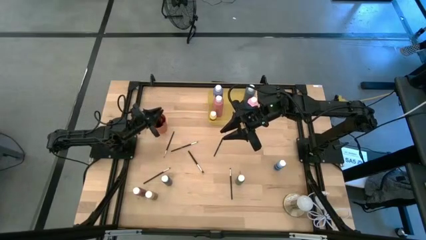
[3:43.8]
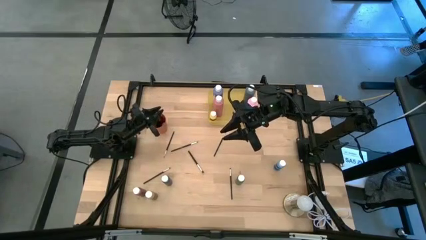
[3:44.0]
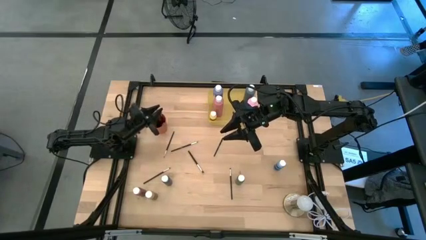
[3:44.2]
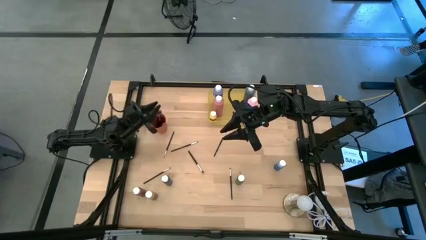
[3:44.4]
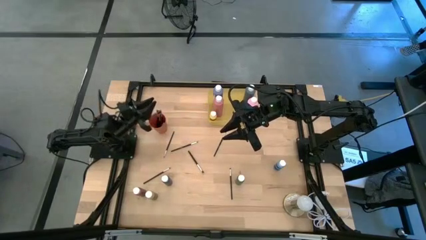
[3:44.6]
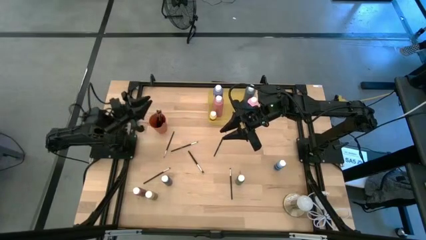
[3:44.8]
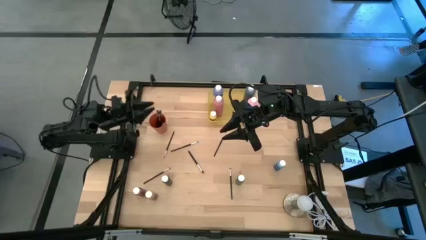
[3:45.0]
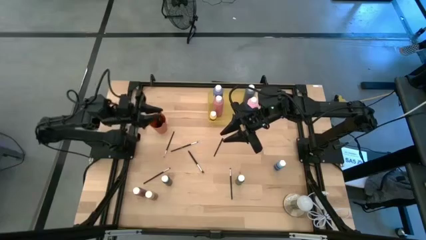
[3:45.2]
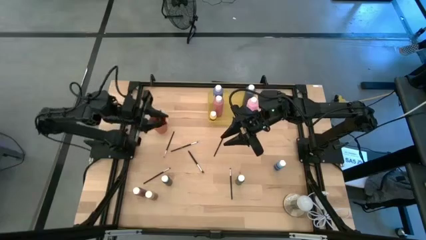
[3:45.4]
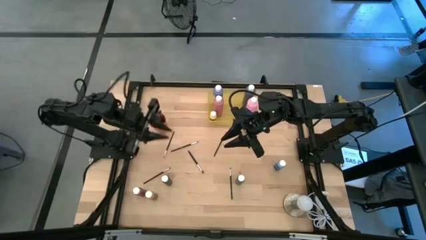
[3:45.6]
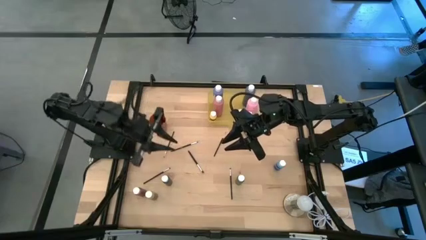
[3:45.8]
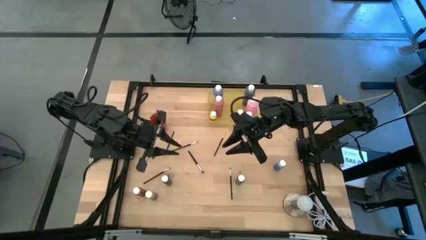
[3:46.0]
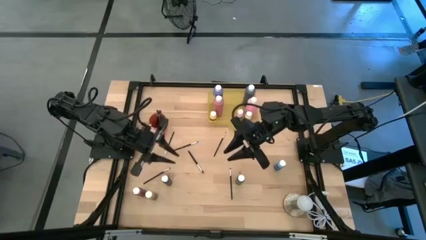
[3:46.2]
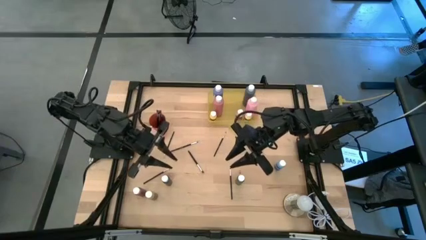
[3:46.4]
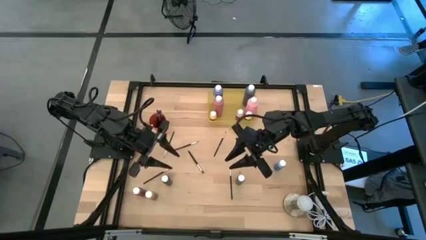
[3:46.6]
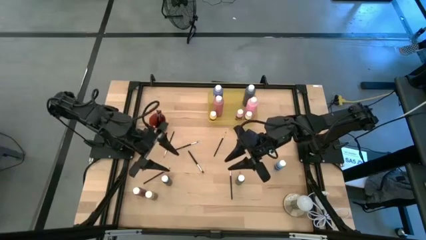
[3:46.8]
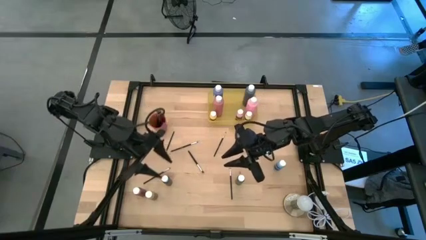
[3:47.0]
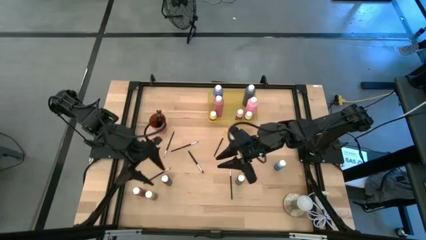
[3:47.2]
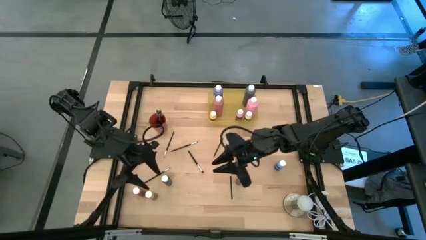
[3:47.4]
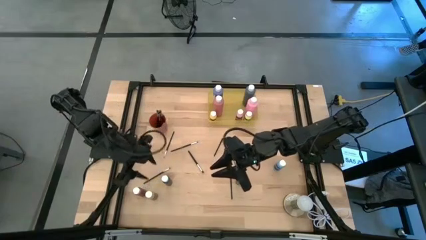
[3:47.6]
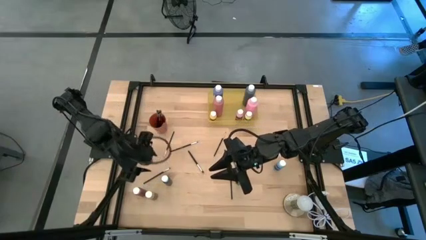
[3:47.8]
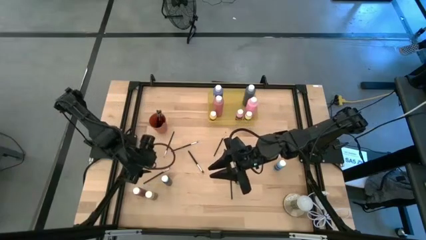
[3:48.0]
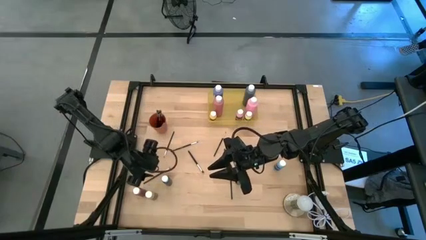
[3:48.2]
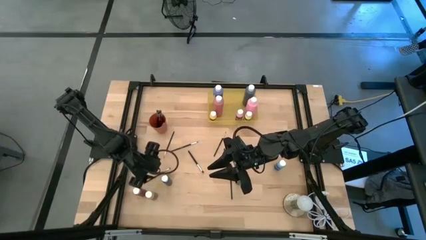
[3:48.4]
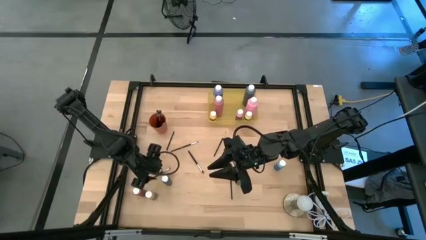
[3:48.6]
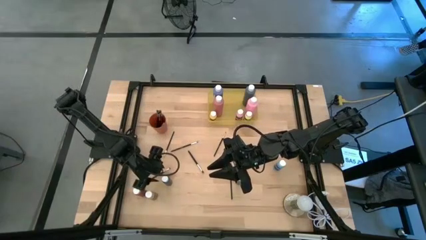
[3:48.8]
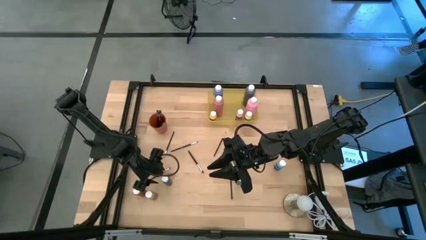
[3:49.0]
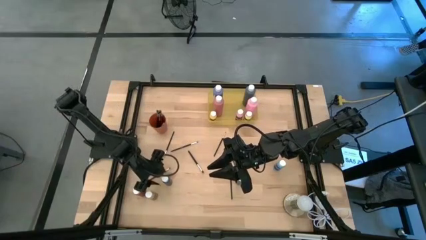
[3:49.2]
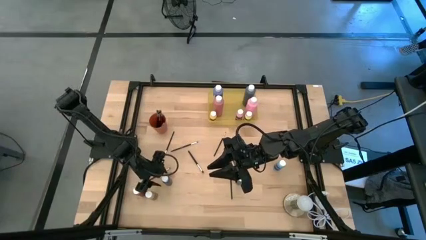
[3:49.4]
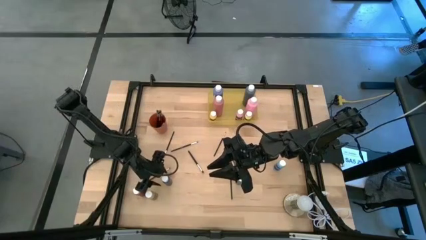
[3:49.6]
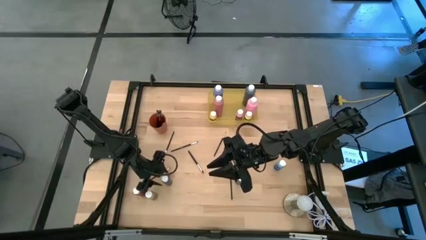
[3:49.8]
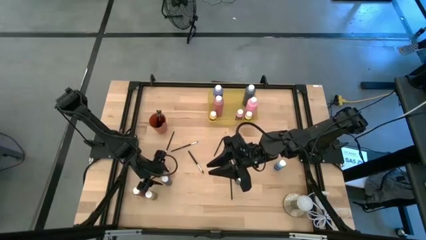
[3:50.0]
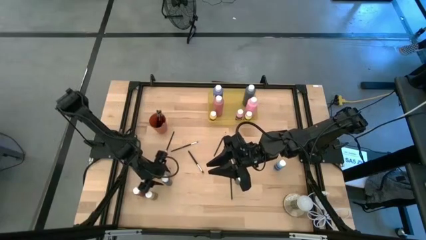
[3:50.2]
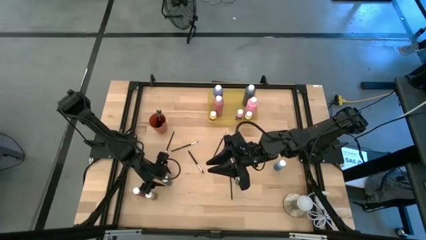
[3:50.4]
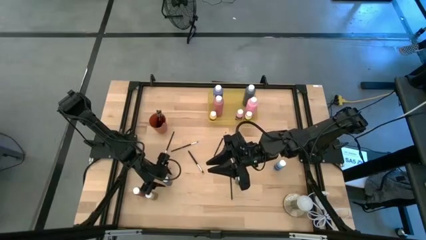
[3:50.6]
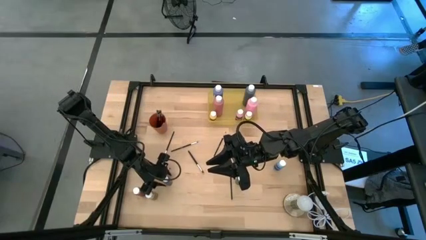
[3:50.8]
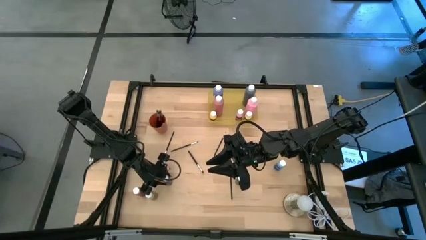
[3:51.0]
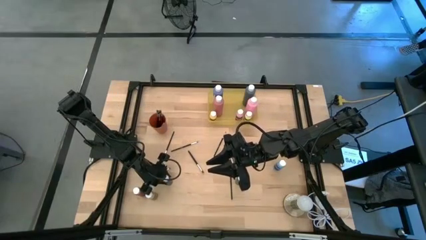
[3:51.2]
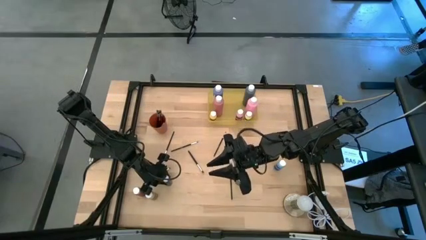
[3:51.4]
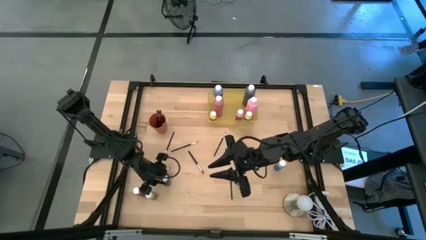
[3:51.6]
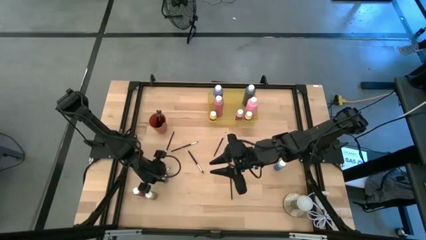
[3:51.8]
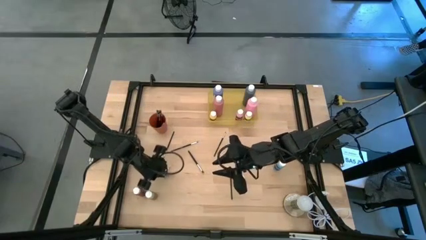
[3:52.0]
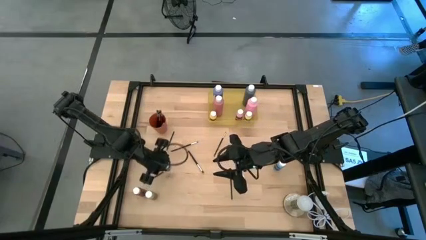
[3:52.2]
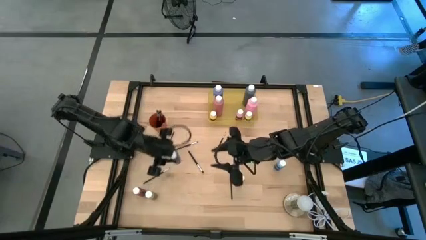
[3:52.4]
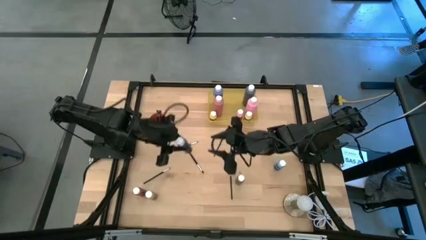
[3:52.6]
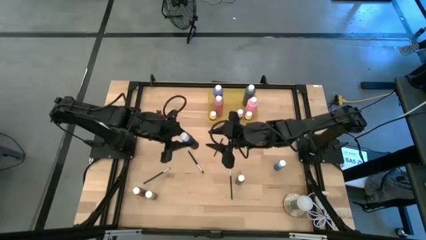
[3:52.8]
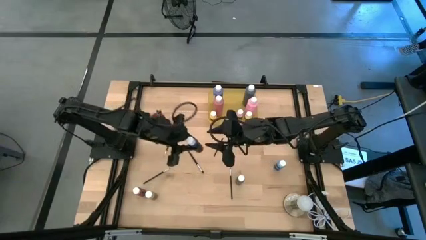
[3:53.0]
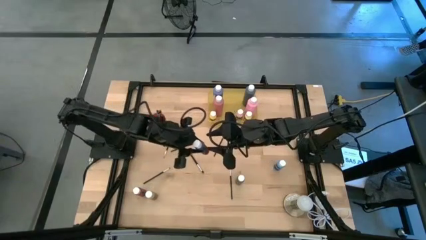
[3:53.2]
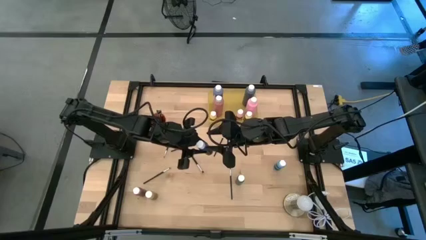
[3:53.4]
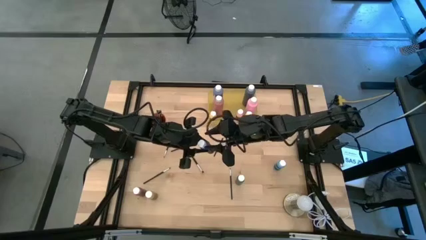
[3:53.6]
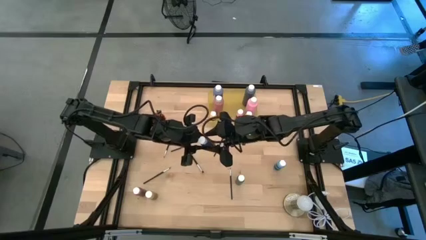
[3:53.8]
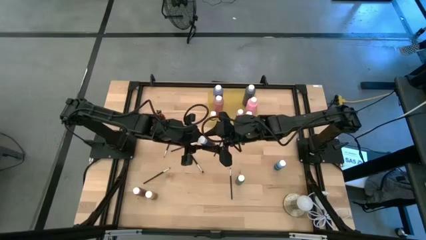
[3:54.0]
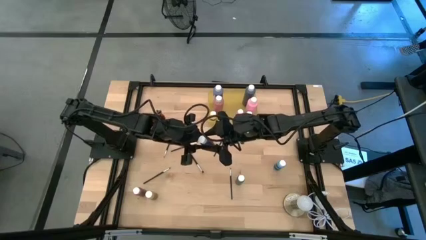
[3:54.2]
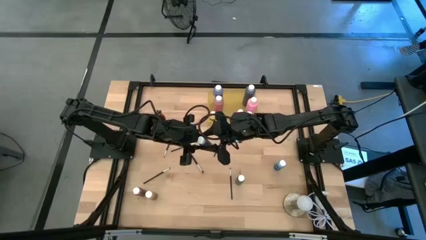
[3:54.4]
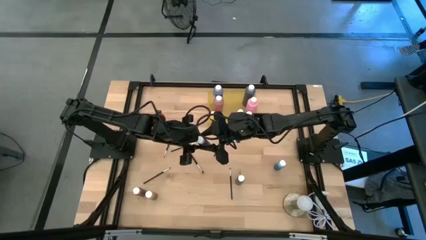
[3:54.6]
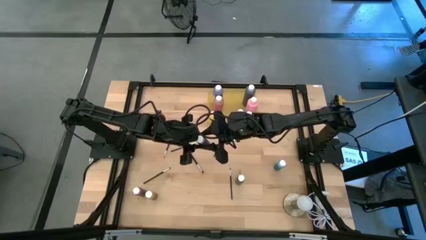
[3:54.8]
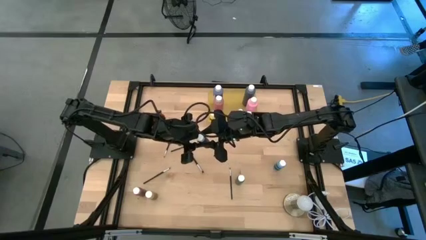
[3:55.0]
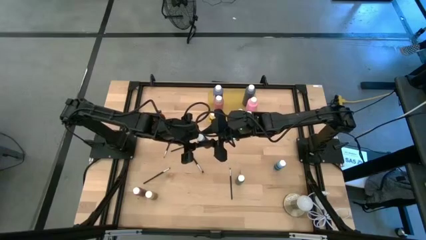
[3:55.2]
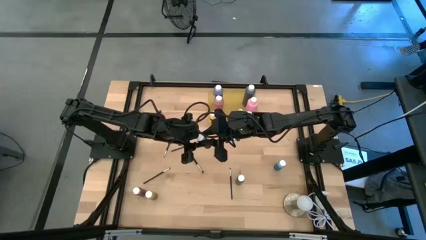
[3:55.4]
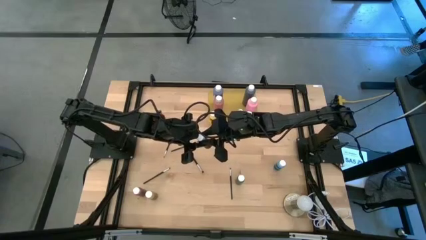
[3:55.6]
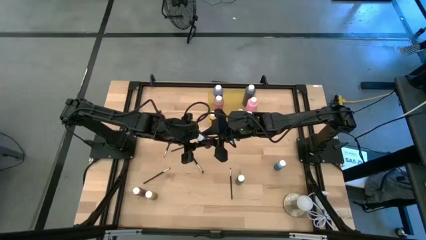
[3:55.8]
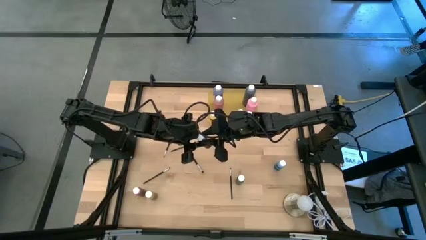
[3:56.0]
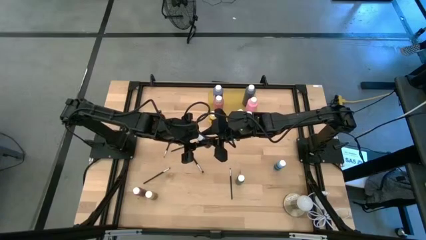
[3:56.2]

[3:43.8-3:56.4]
Task: Pick & Place Paint Supplies
Put the small dark blue paint bottle into the yellow bin

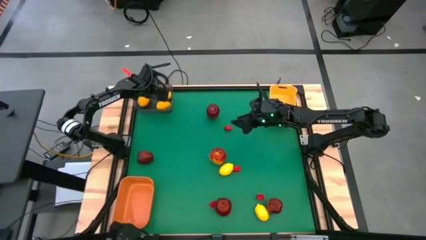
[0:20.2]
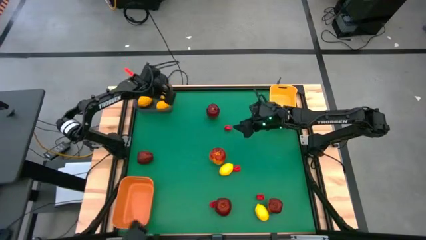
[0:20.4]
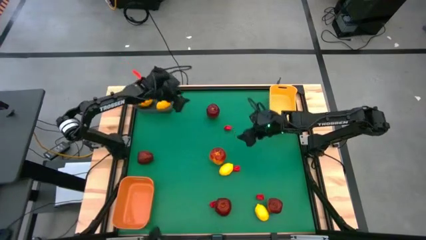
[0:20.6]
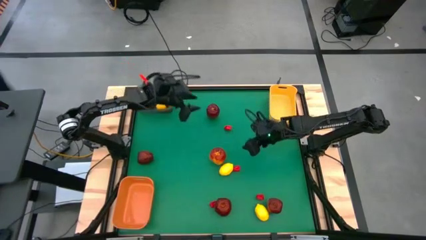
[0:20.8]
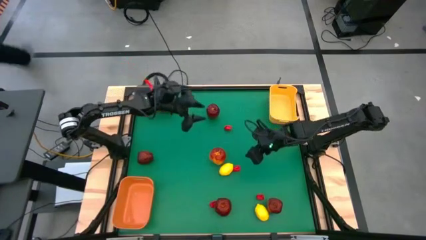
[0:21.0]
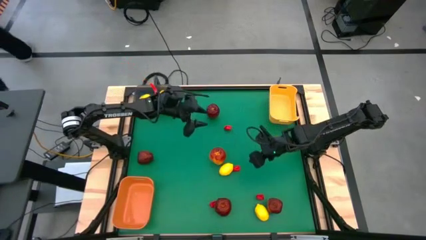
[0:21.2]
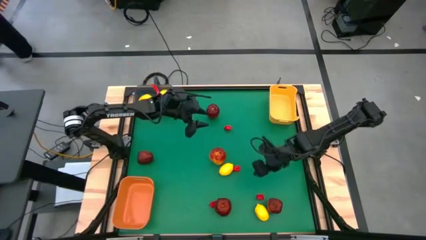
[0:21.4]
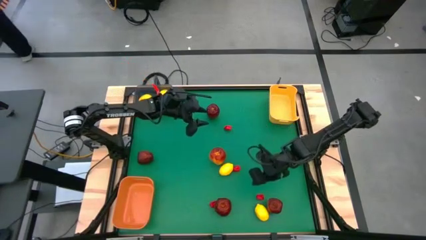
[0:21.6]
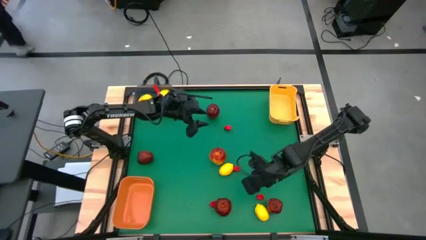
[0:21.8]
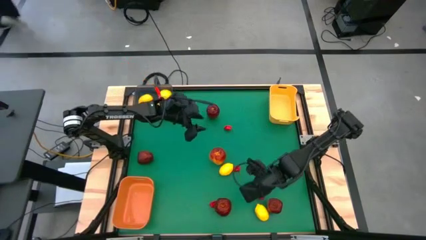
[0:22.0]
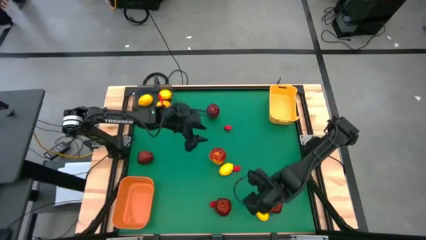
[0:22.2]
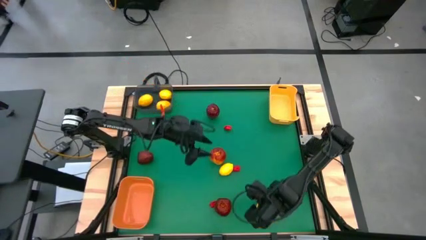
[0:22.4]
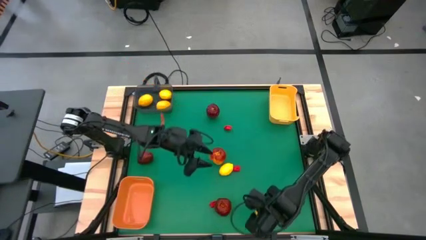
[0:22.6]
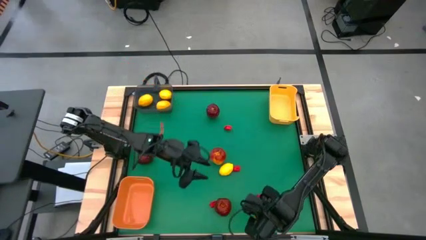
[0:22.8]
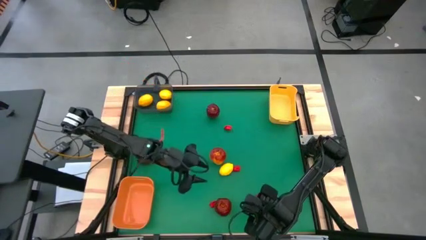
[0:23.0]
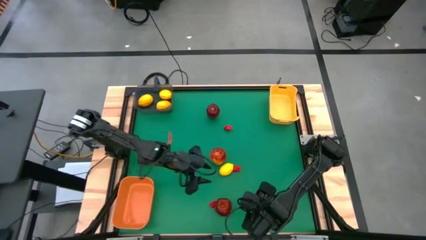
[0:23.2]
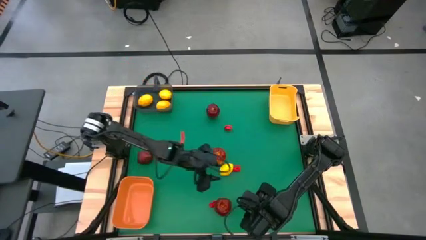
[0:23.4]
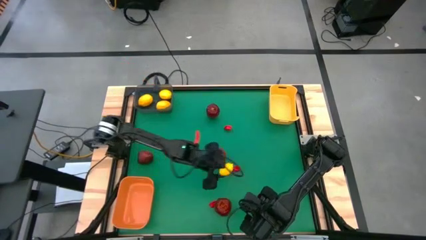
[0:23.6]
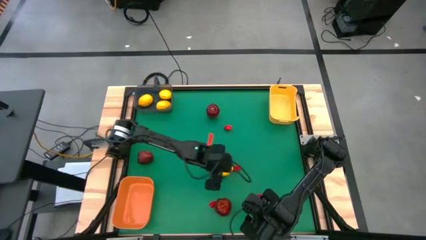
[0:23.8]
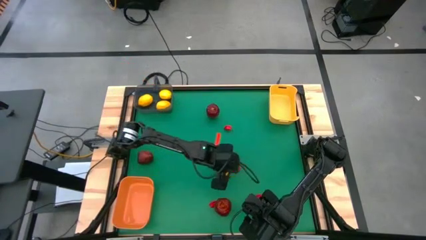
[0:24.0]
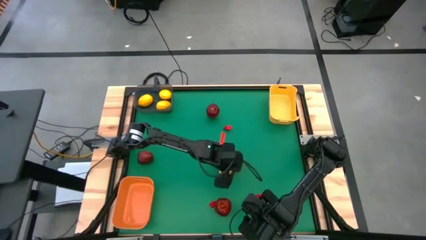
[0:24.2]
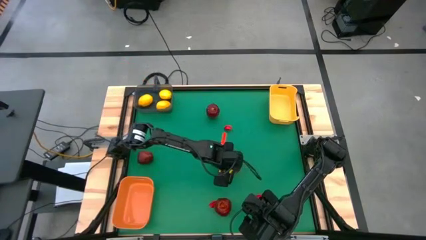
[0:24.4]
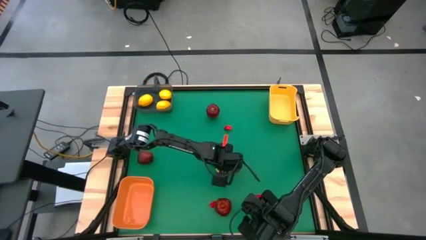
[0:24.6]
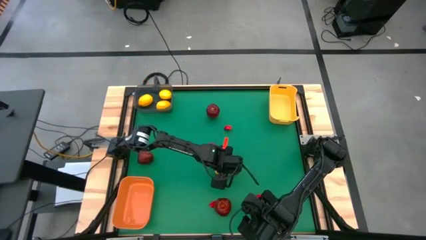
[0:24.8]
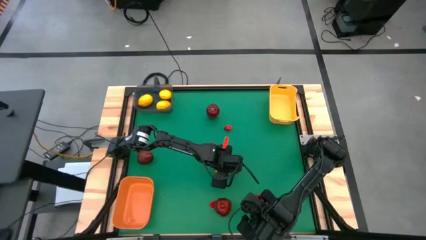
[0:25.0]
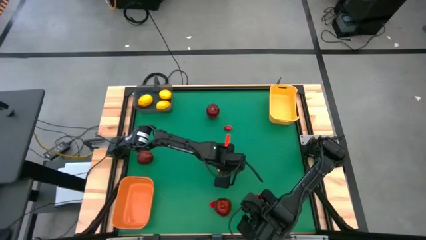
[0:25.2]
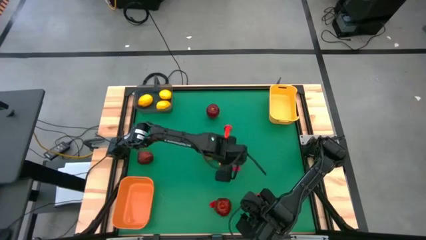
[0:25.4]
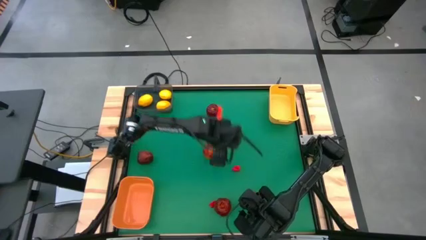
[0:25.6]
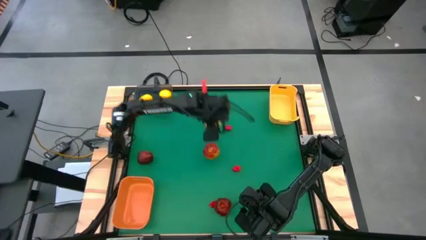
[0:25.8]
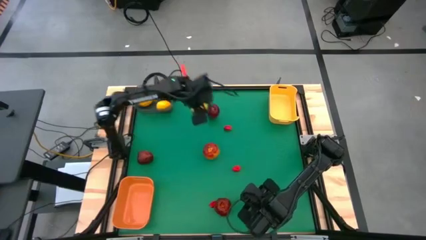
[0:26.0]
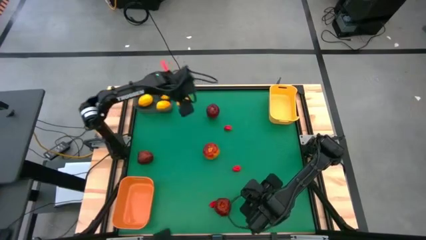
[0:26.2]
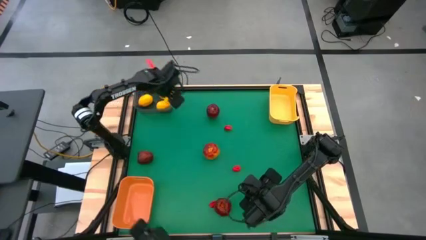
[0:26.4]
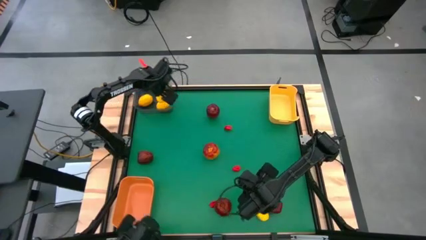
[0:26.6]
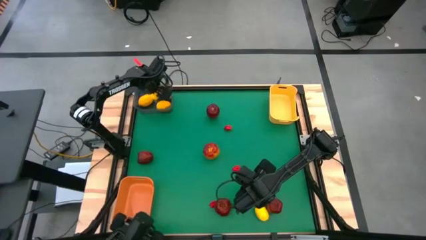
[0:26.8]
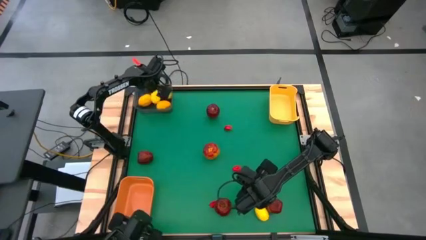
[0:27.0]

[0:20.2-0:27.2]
Task: Sort produce into baskets
Put the top lemon into the gray transparent bin
